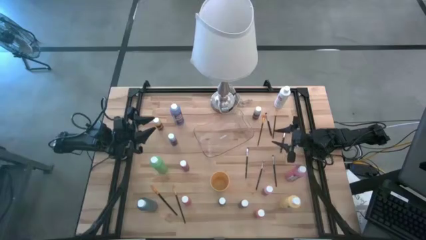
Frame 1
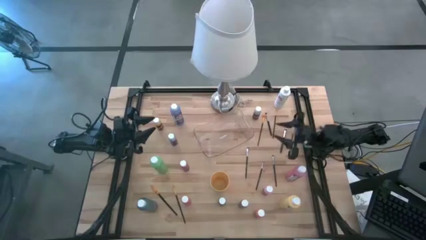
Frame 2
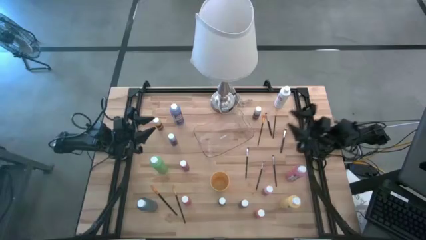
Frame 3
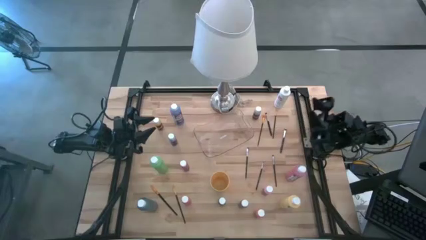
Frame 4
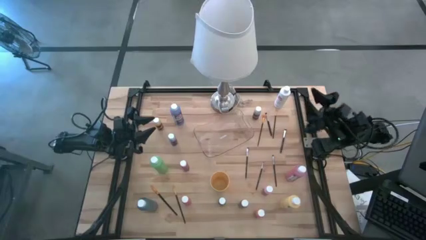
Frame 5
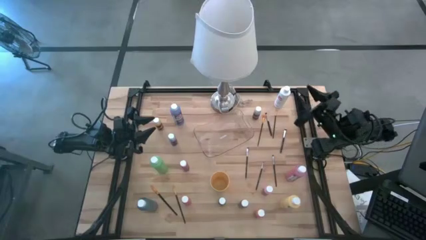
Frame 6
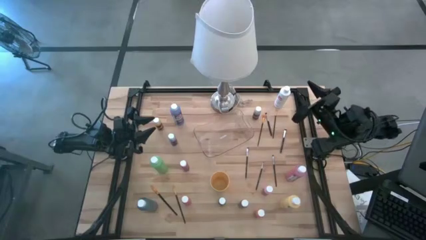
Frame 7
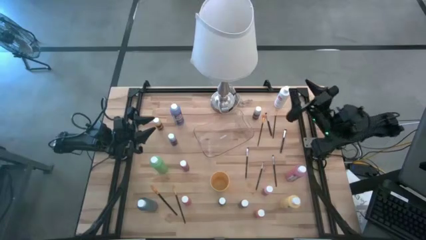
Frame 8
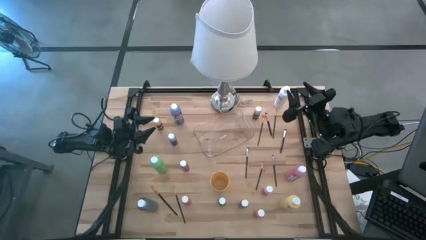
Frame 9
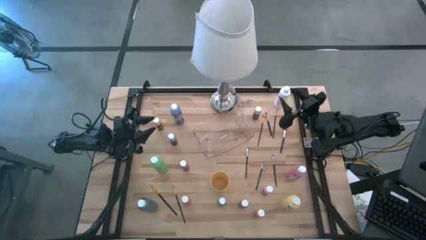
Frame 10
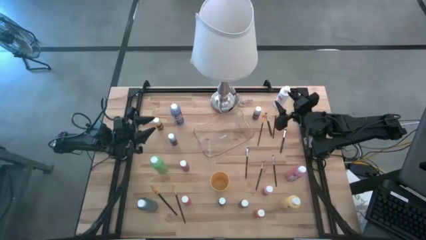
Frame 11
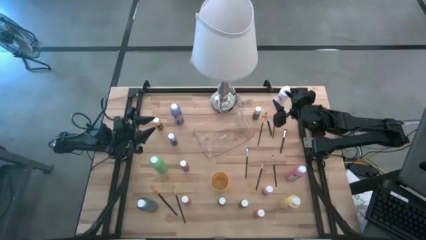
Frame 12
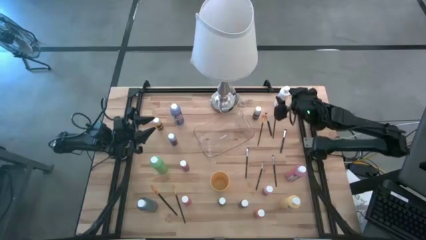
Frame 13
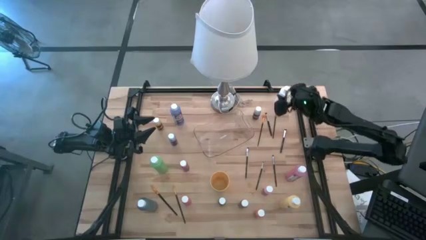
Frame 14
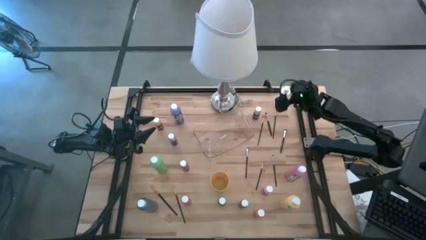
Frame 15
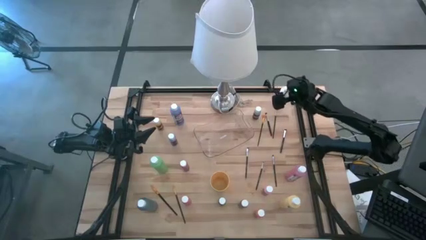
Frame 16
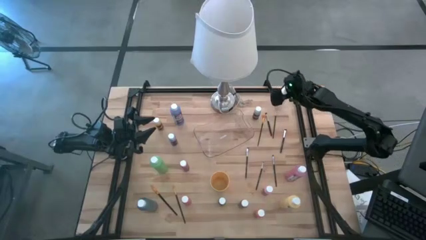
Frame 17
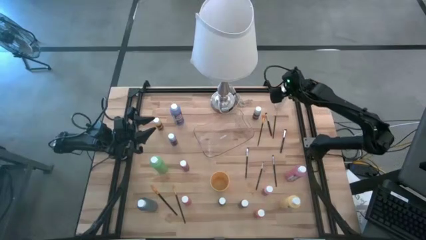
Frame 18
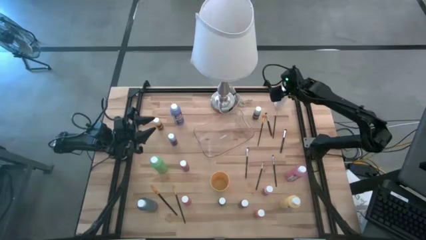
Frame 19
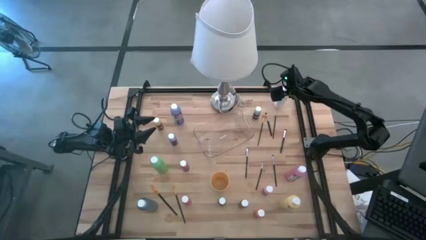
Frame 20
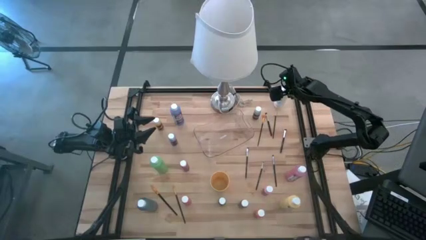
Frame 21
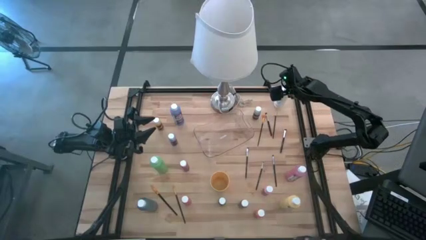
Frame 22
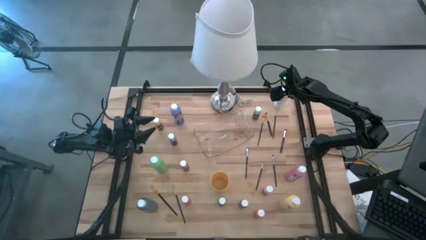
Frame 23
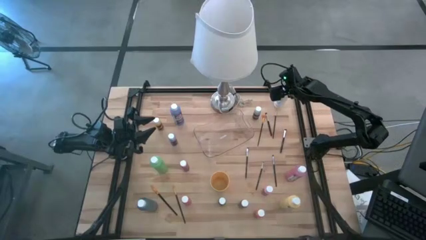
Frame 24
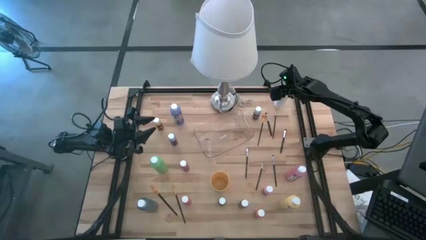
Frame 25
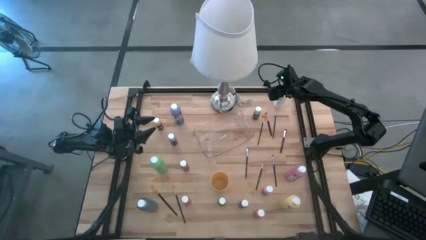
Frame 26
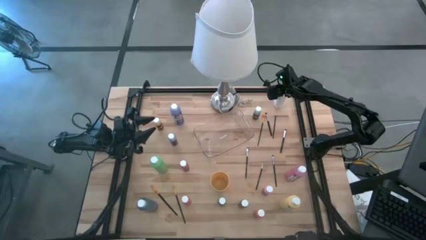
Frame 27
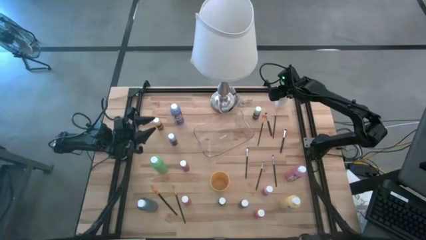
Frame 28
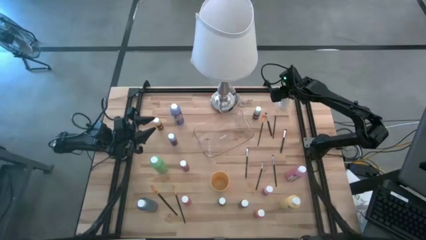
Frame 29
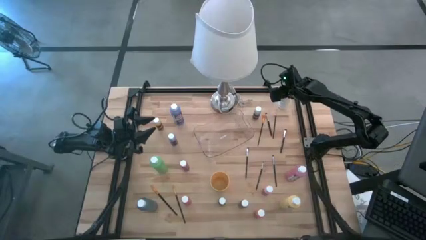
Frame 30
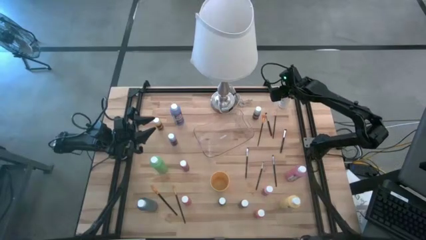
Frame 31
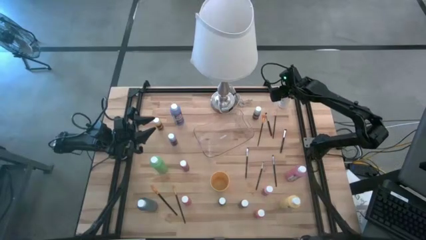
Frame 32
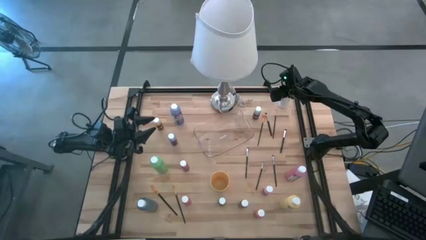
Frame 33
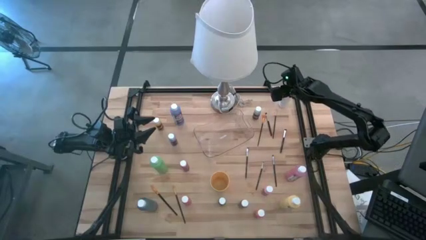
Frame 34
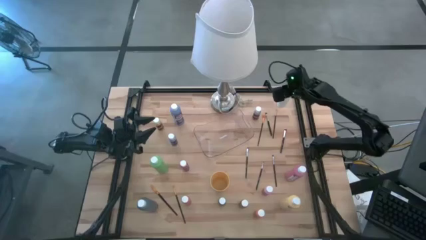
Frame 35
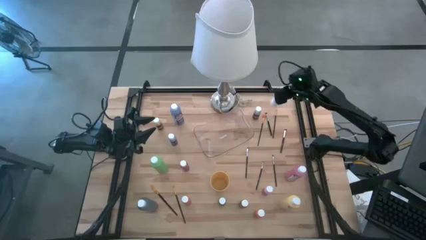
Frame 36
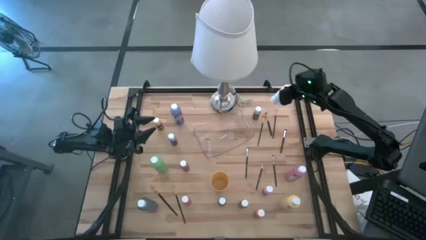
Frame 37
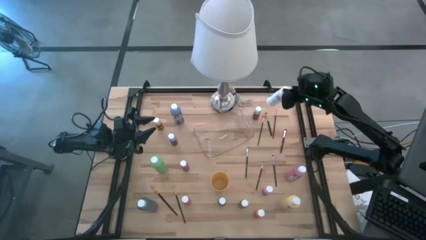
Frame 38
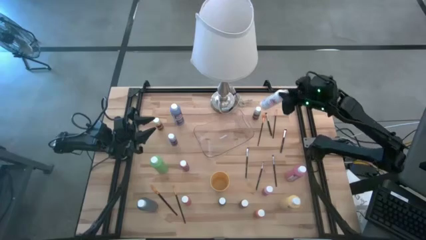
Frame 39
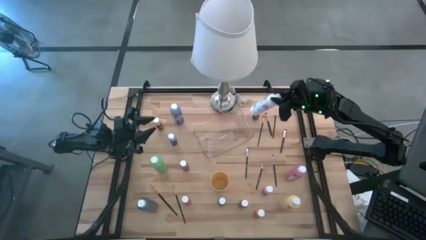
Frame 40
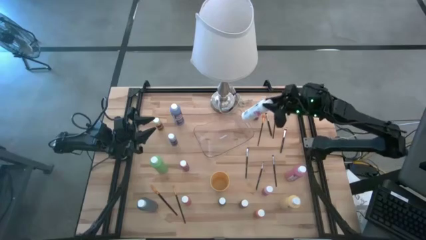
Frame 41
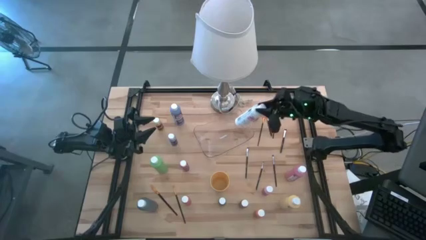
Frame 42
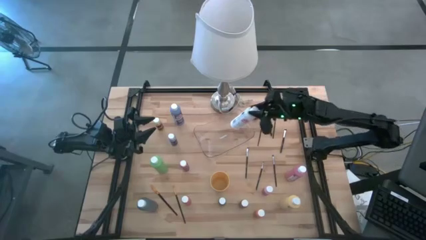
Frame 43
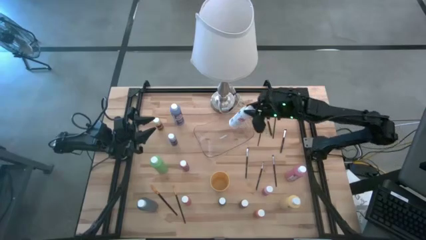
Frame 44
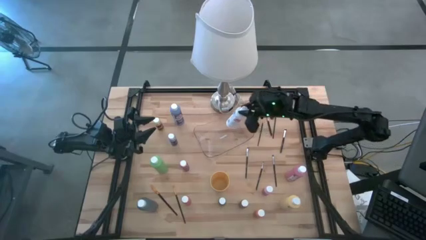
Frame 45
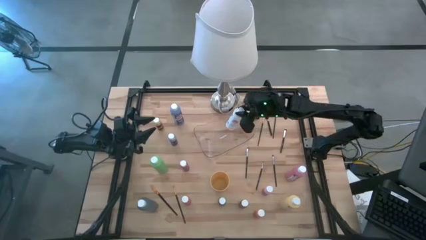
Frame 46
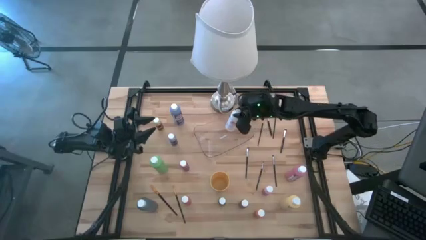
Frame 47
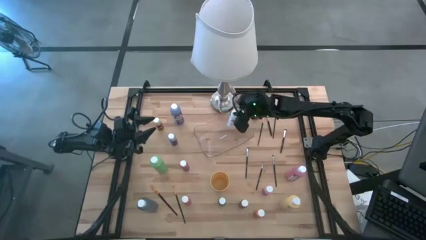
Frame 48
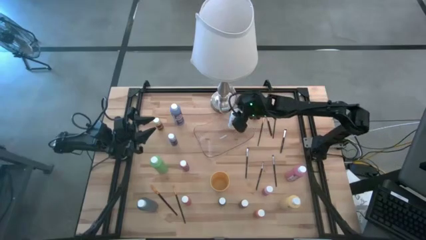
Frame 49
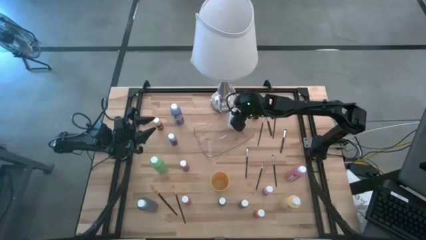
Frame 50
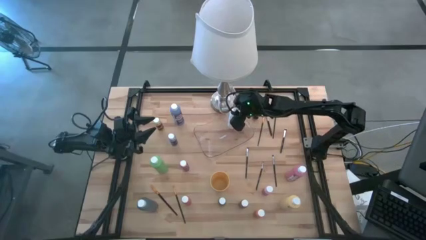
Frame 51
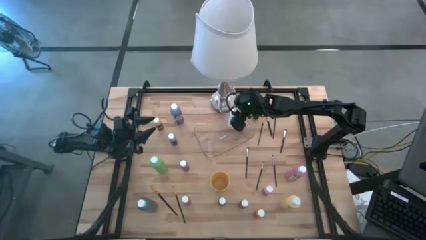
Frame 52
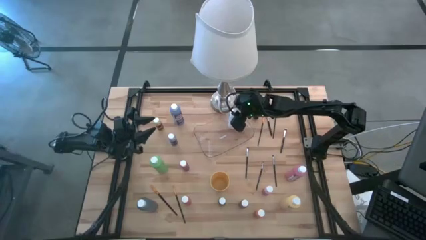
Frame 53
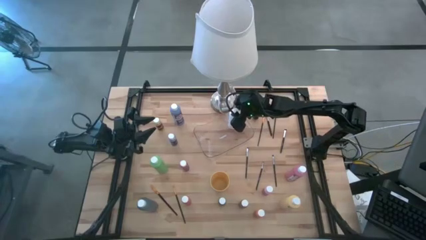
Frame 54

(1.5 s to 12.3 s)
Task: Pick & Place Paint Supplies
Put the white bottle into the transparent bin
